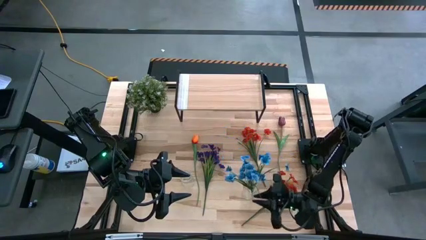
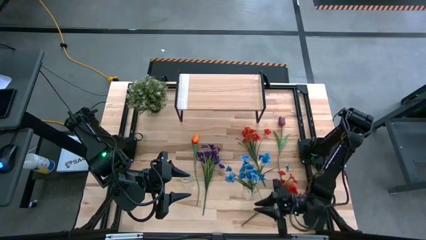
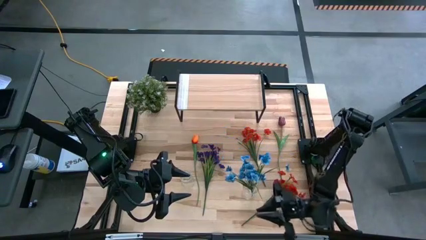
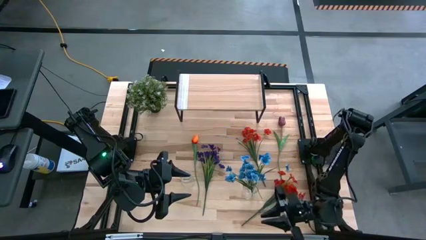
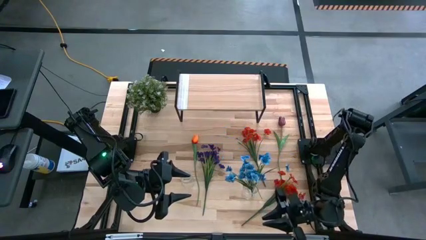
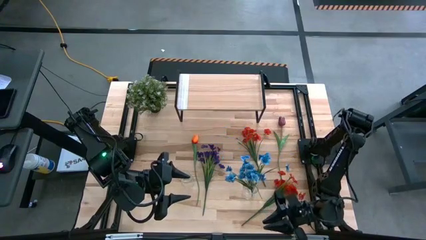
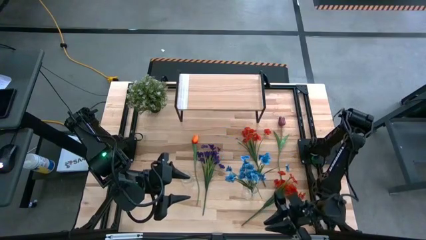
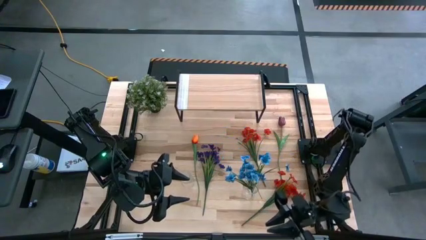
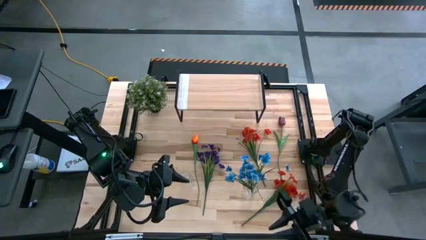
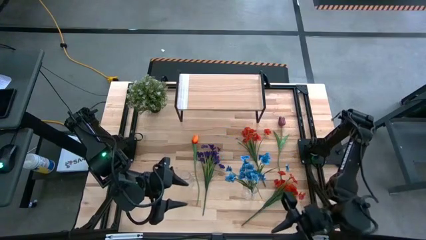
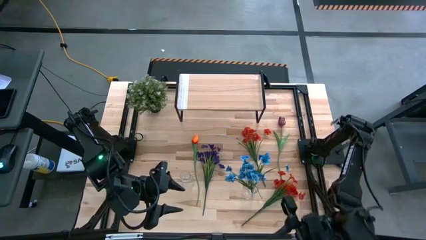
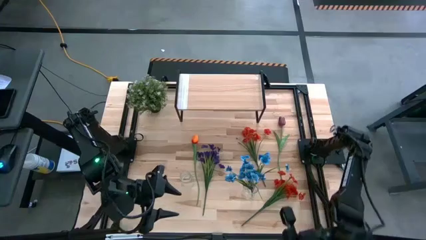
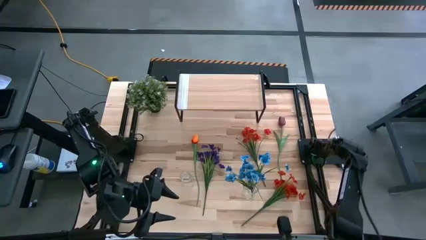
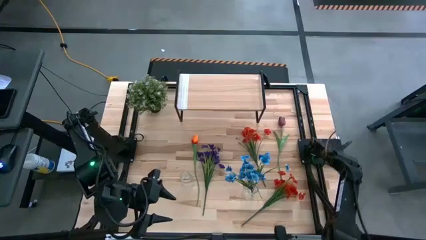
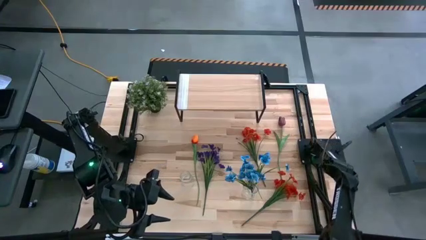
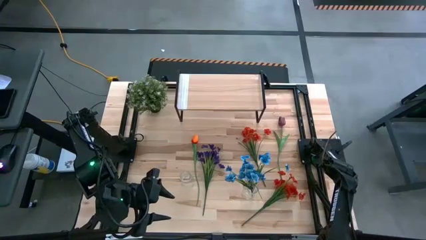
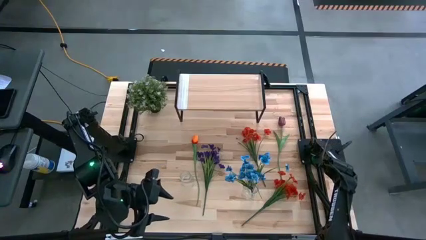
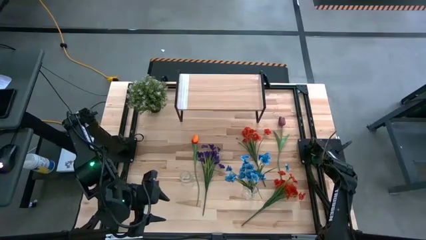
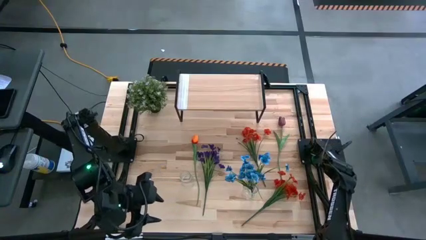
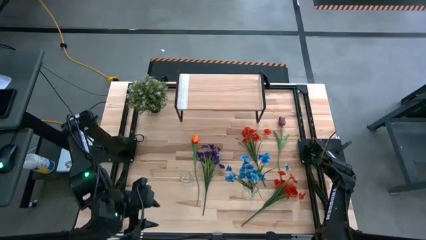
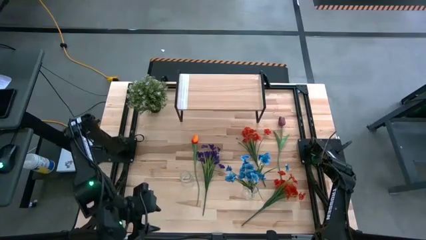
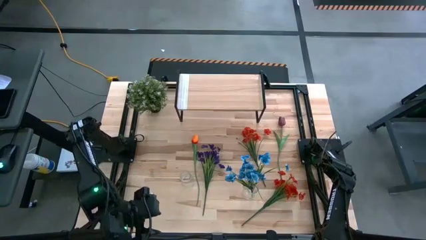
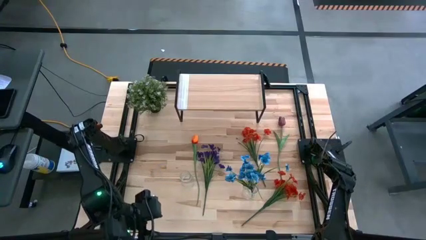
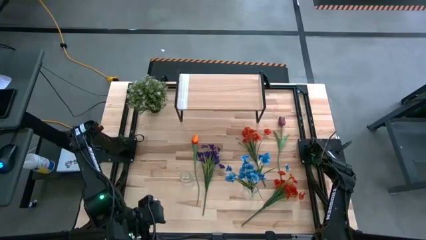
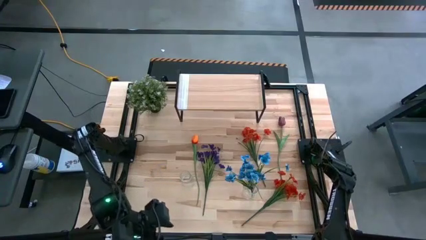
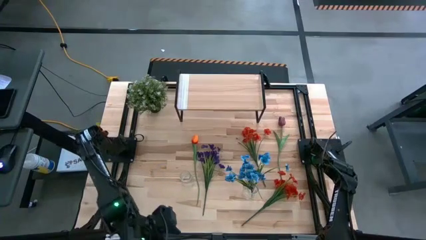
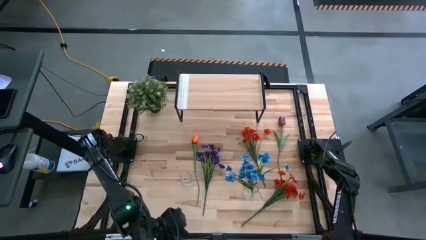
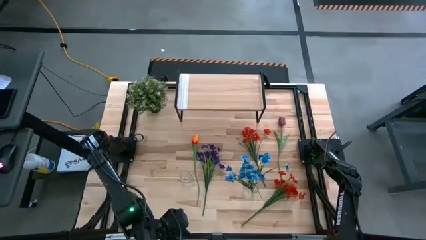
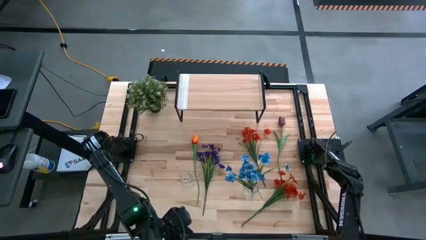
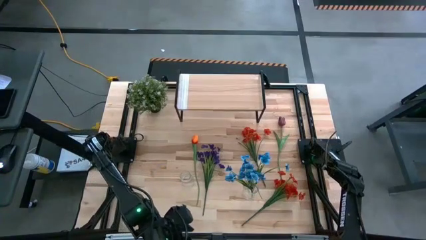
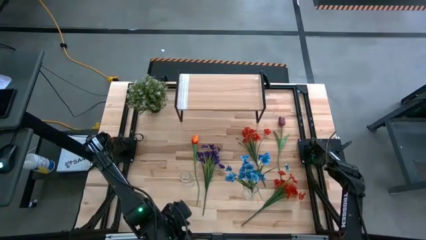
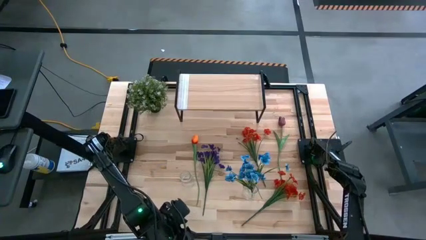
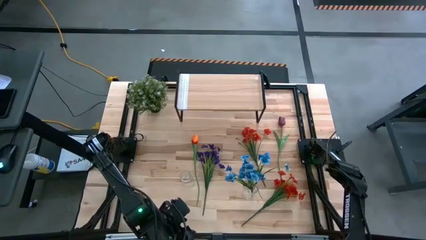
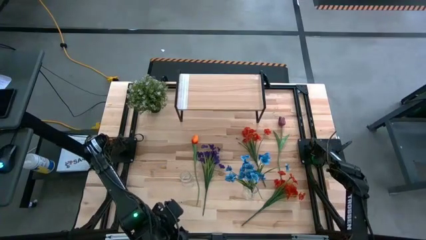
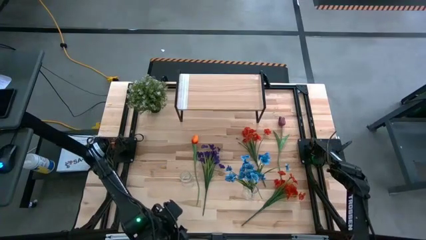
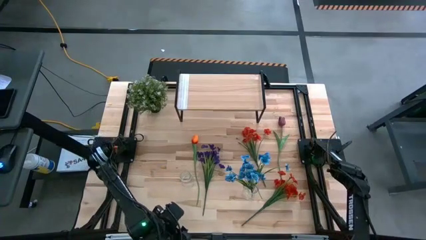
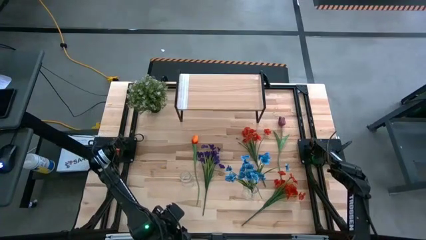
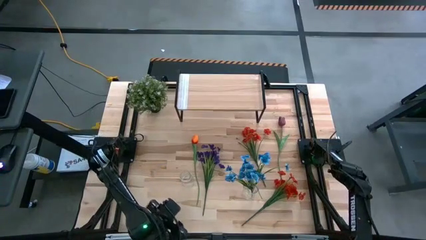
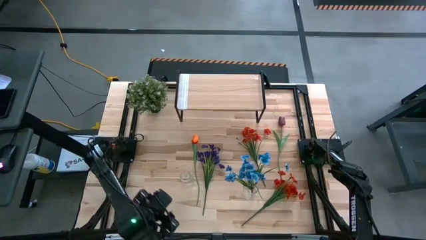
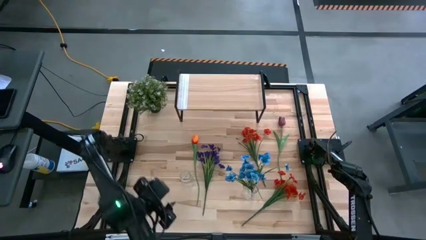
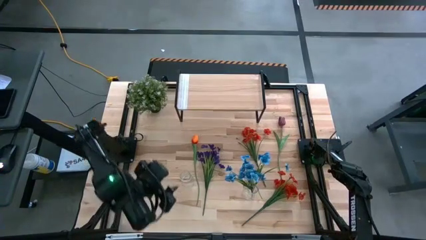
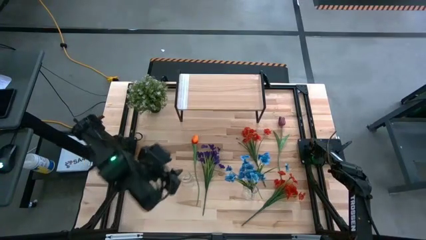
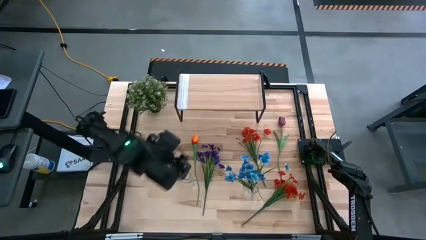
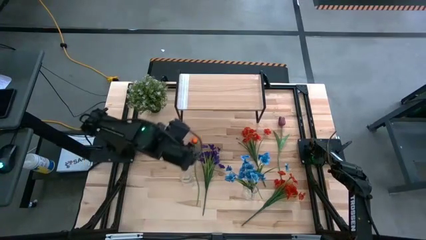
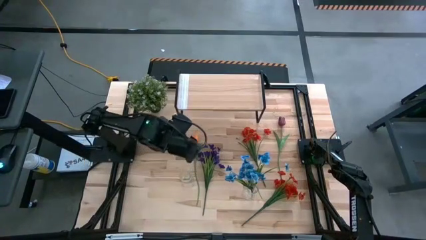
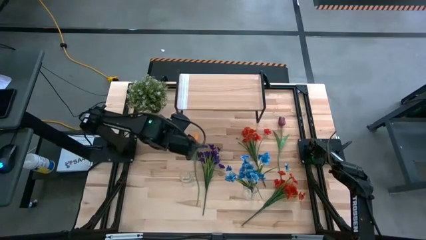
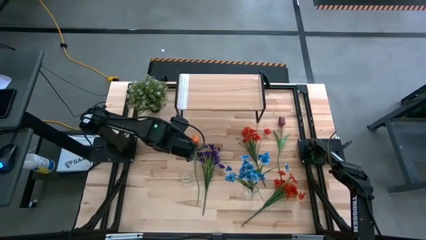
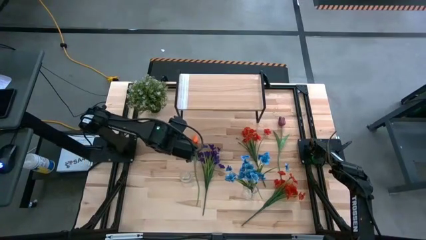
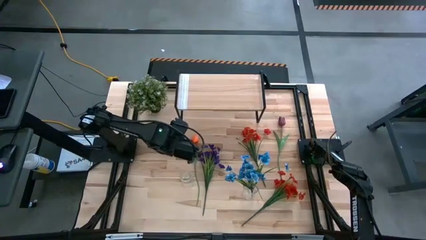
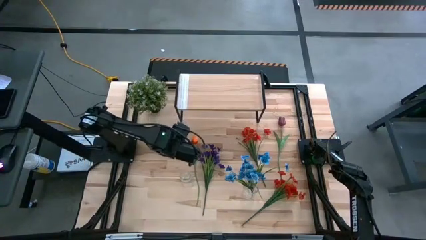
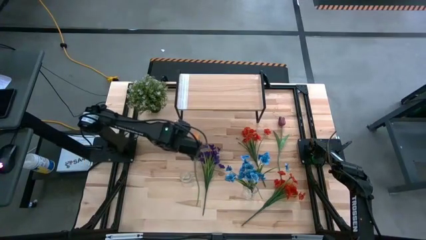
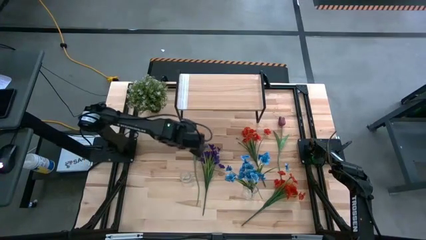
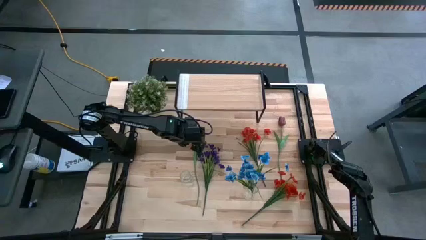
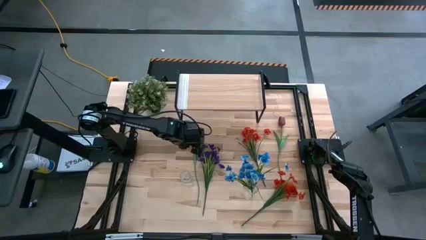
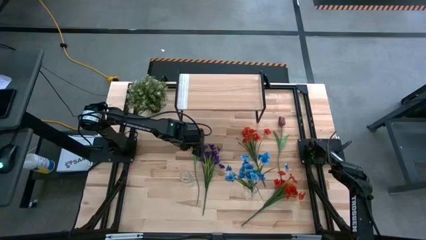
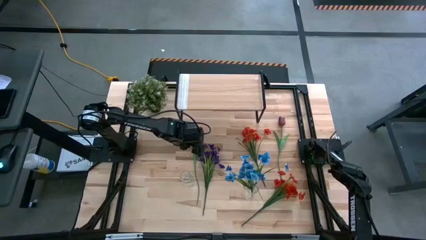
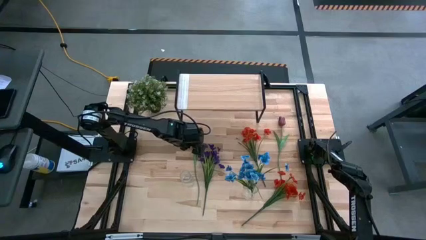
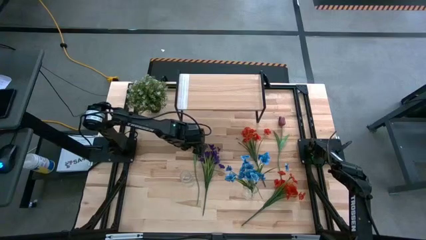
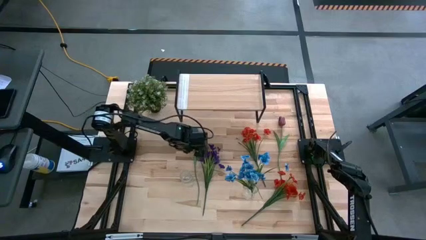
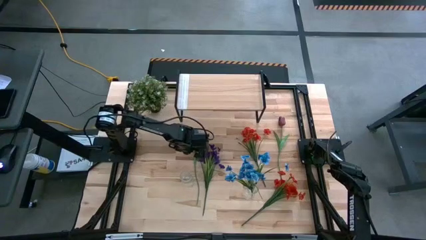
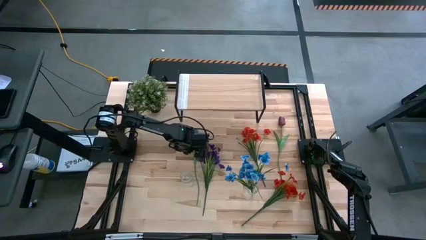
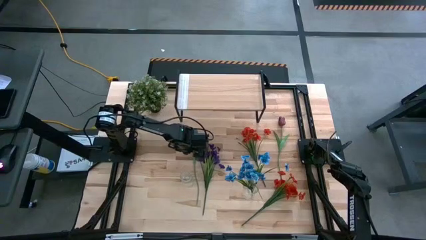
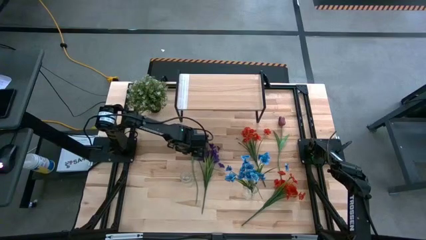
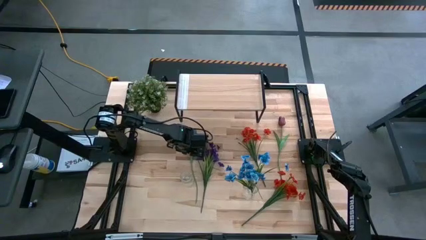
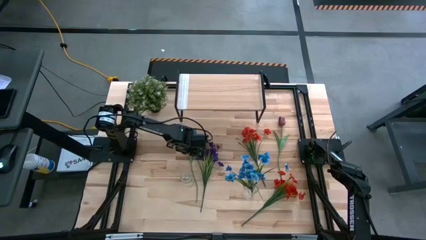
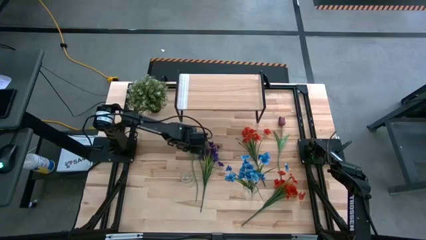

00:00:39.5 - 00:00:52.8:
Task: Pick and place flowers into a vace then onto a shelf
Put the light orange flower into the right transparent vase
